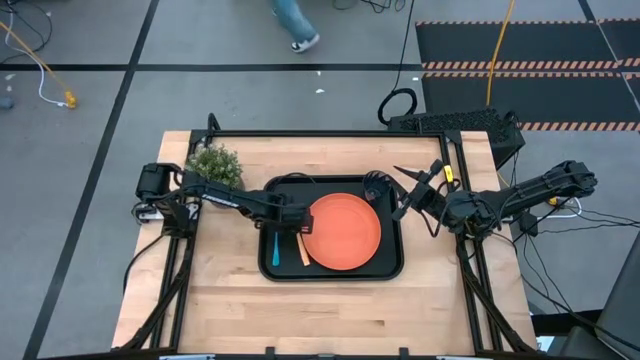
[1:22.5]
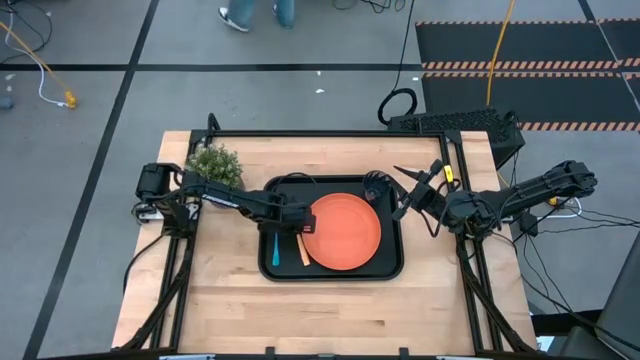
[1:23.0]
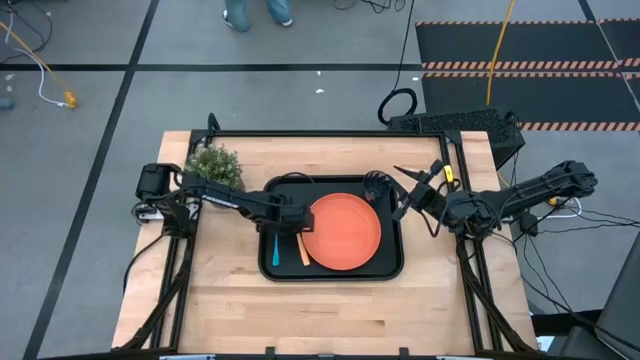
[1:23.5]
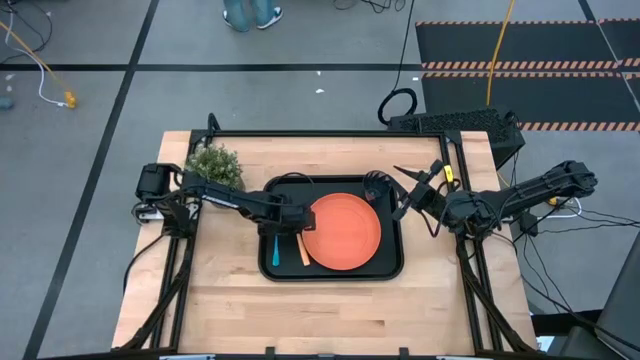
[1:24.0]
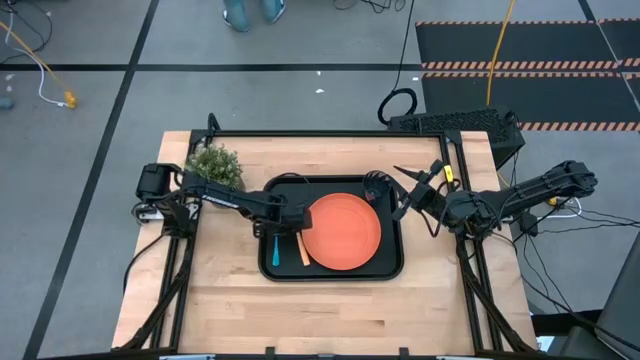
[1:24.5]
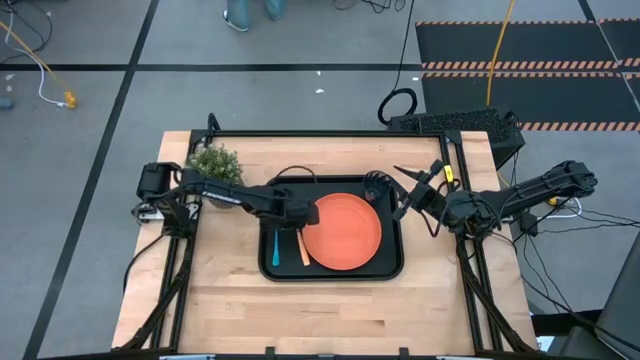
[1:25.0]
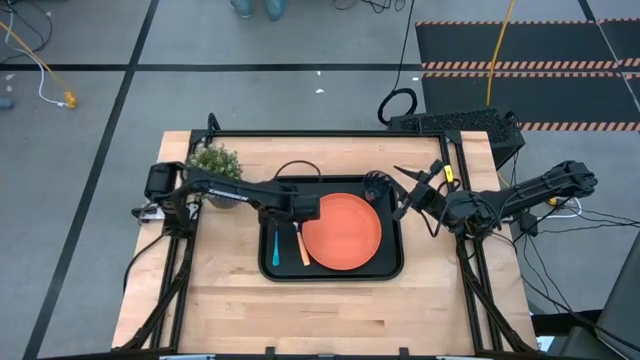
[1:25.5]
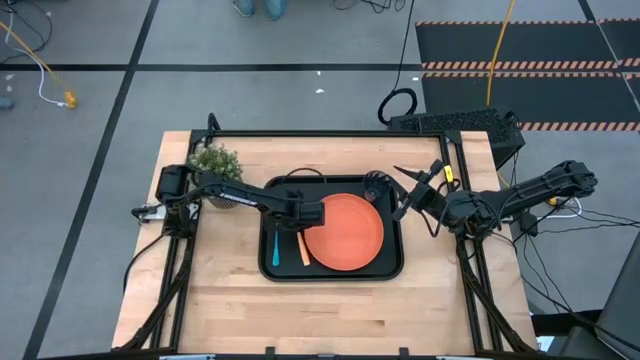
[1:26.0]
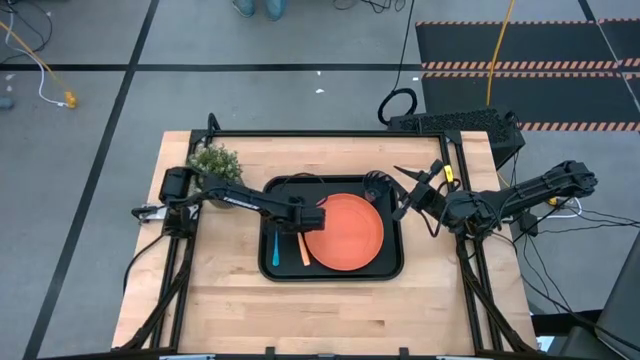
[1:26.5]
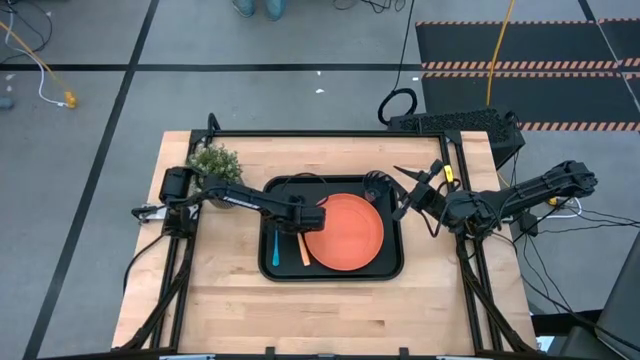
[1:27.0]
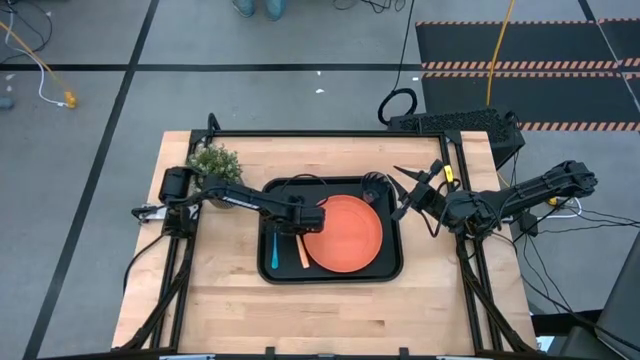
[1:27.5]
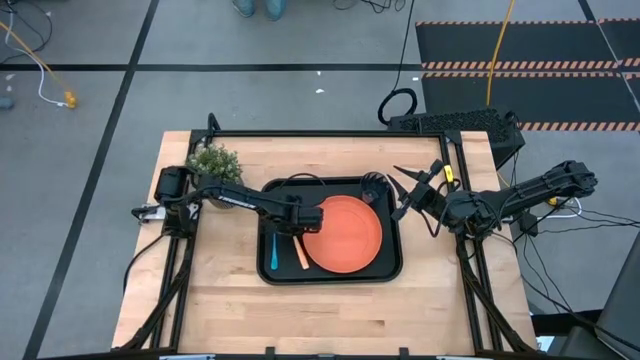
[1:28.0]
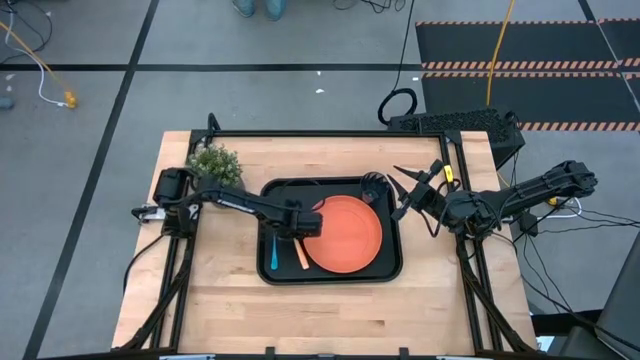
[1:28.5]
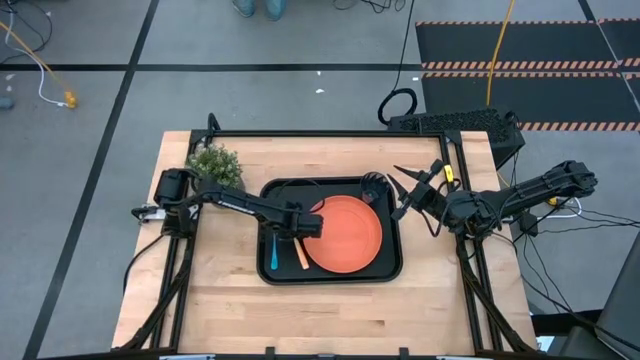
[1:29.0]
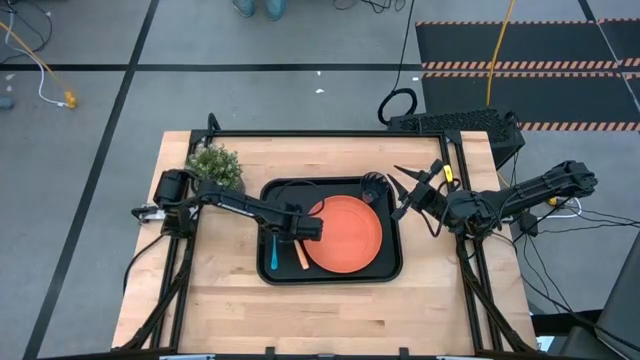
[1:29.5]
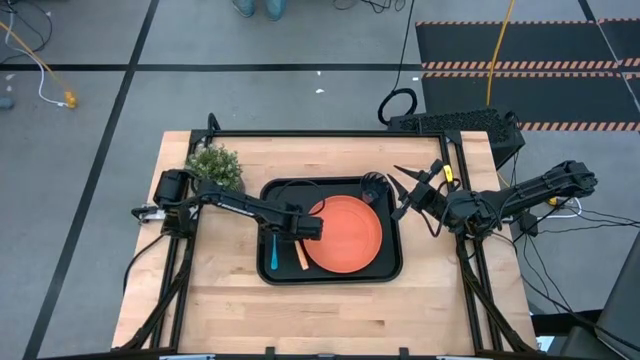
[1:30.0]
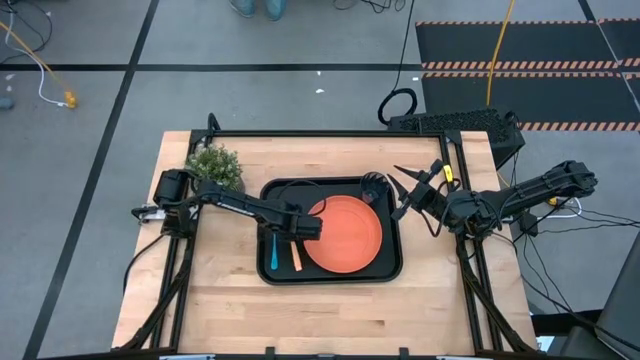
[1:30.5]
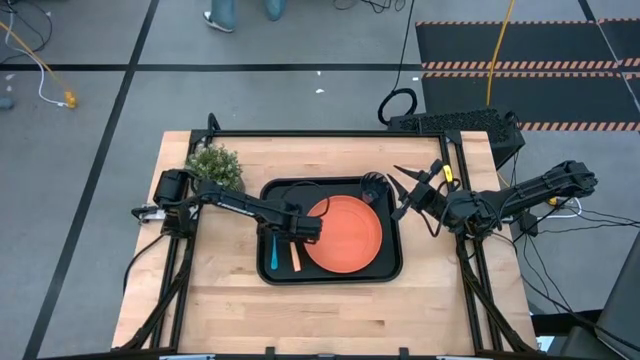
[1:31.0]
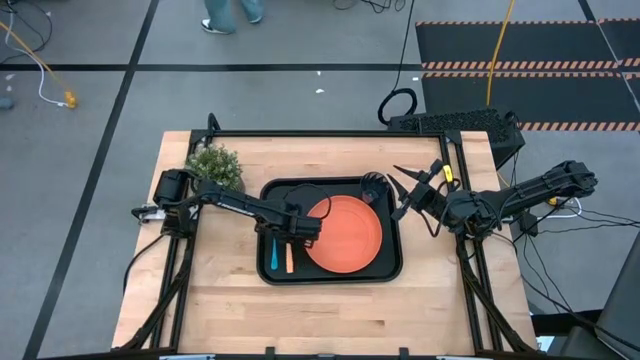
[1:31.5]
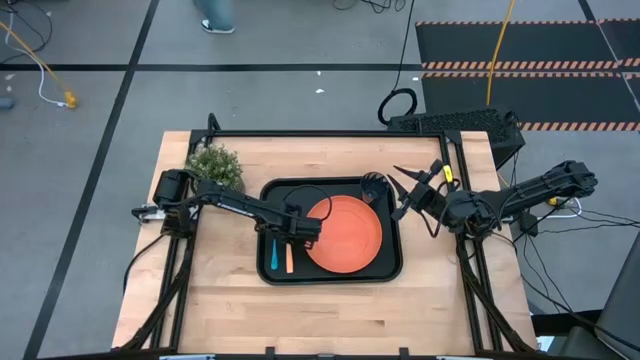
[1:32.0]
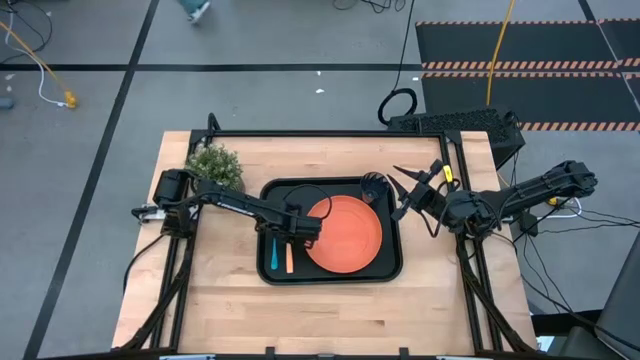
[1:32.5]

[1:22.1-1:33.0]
Task: Pick and place plate/cup/fork/spoon on tray
Adjust the light orange fork on the black serving tray

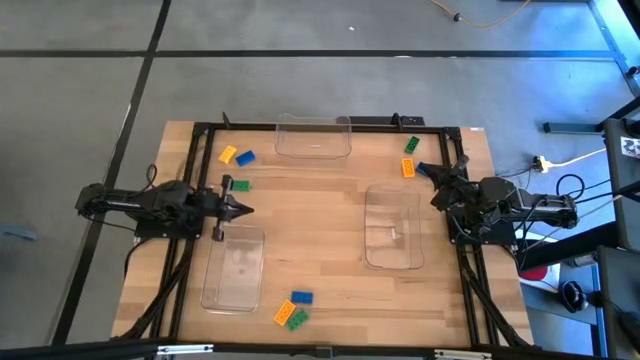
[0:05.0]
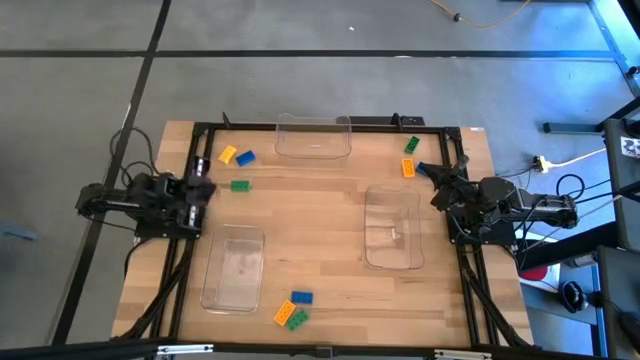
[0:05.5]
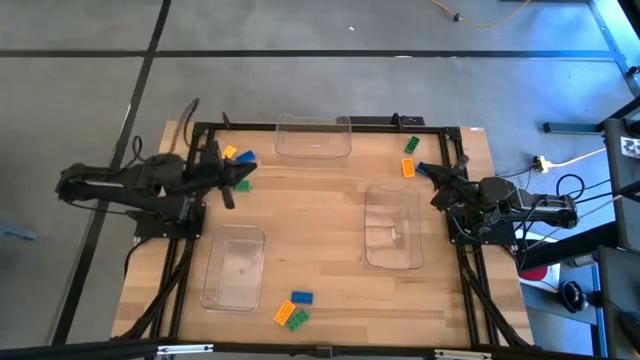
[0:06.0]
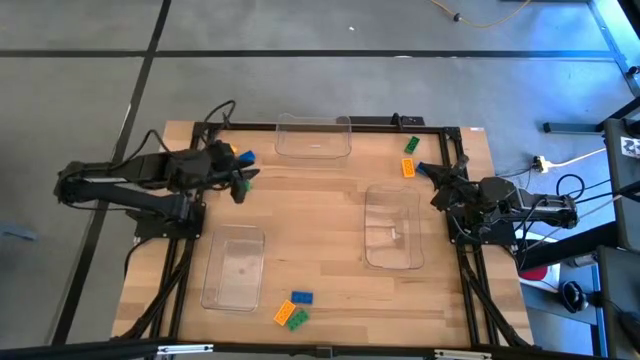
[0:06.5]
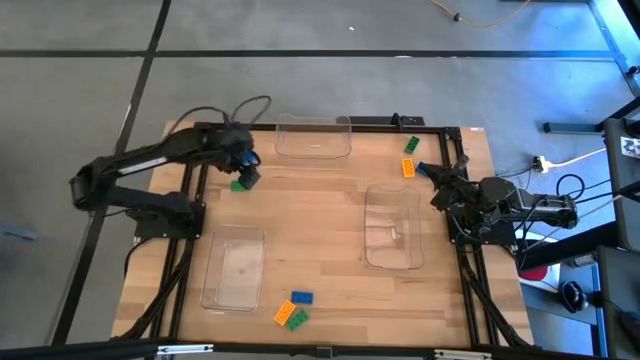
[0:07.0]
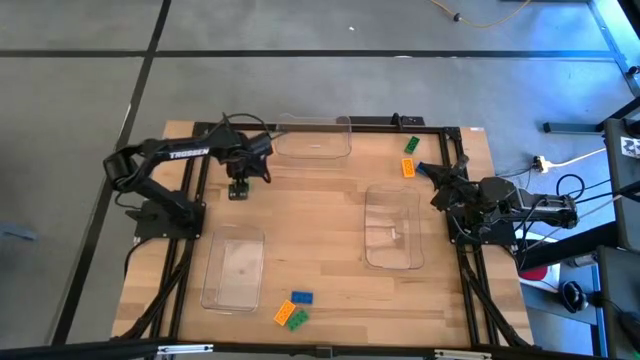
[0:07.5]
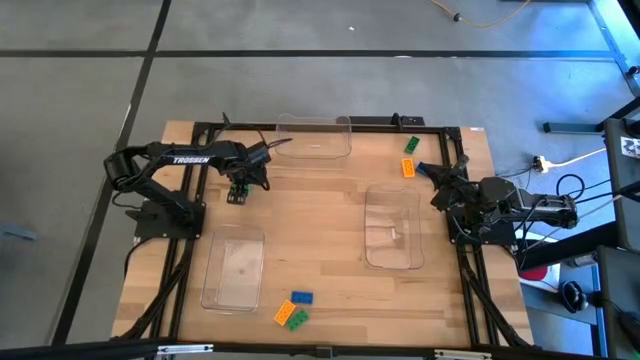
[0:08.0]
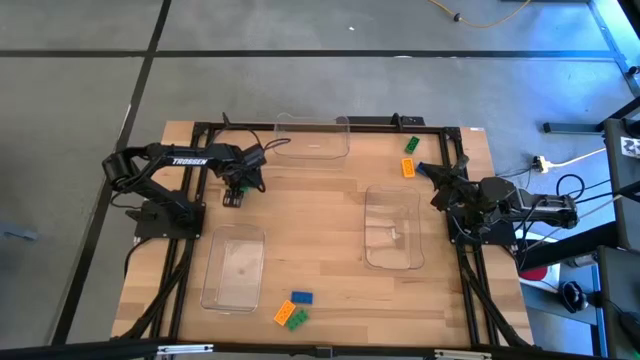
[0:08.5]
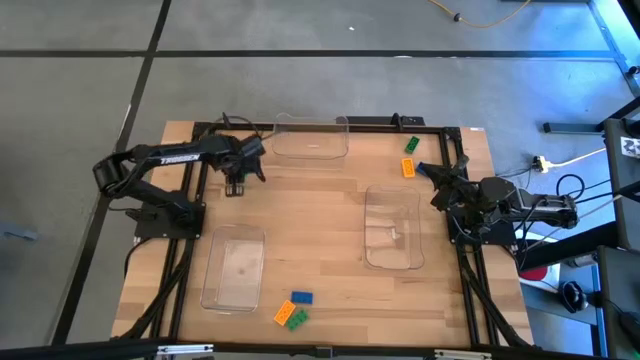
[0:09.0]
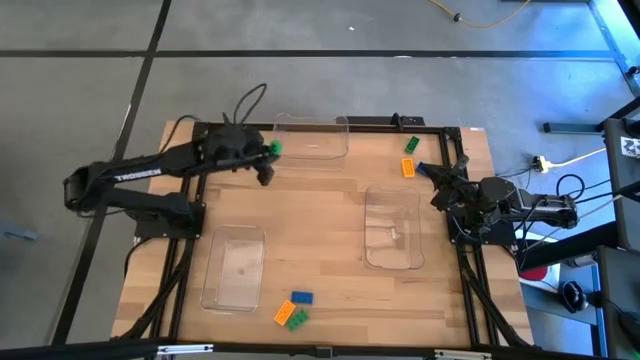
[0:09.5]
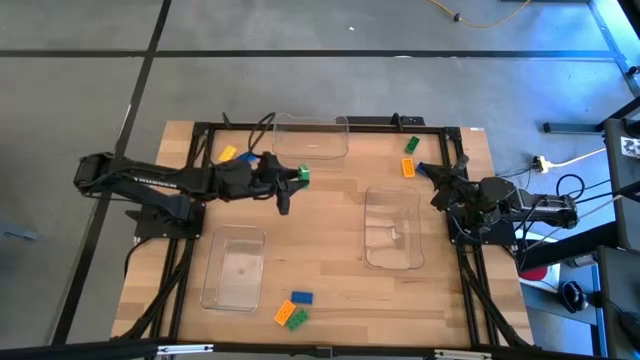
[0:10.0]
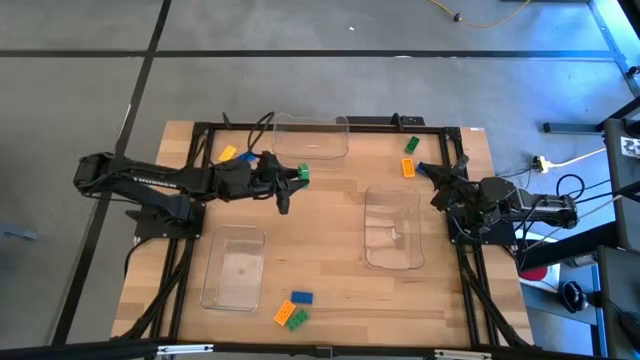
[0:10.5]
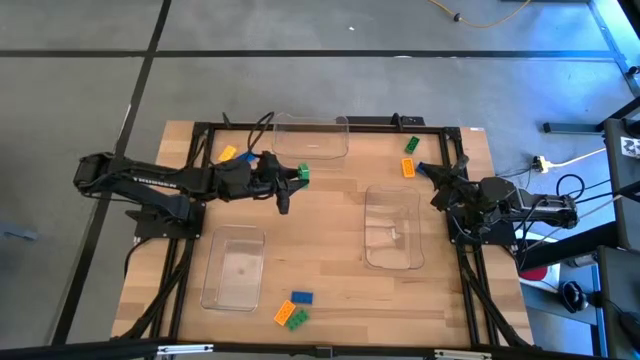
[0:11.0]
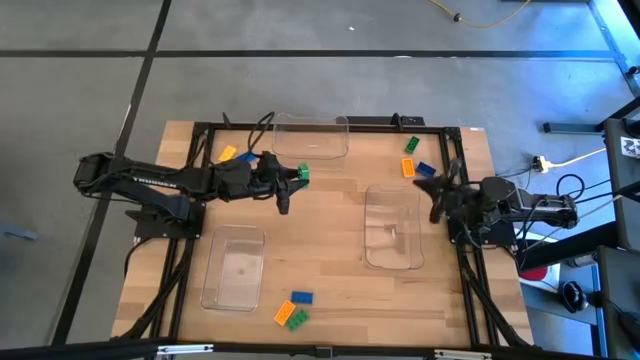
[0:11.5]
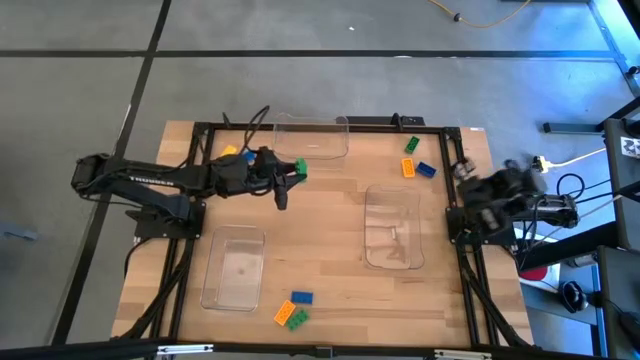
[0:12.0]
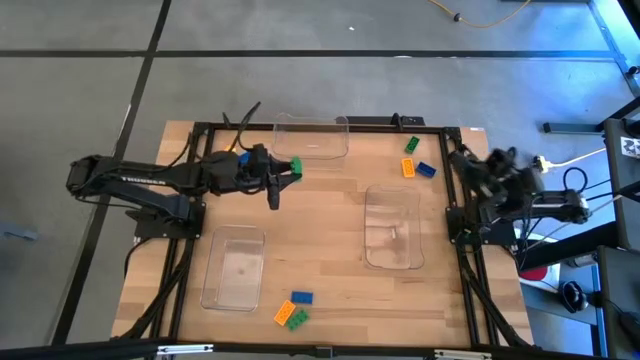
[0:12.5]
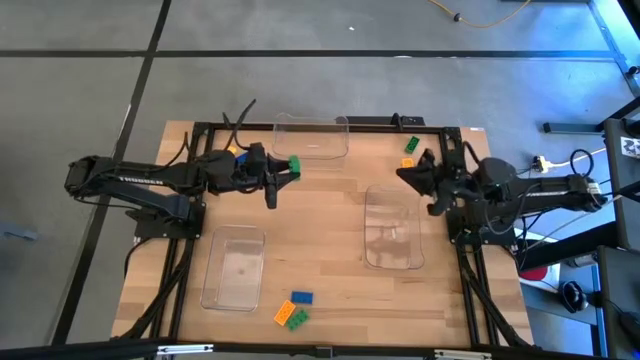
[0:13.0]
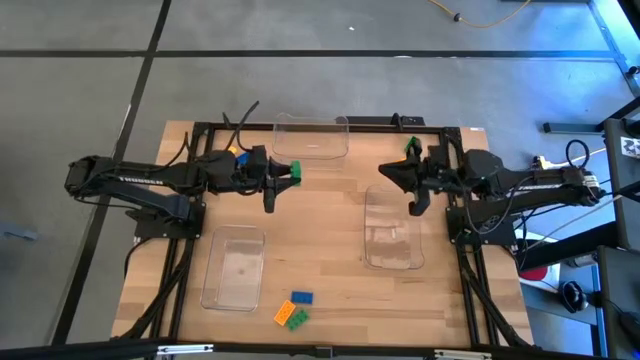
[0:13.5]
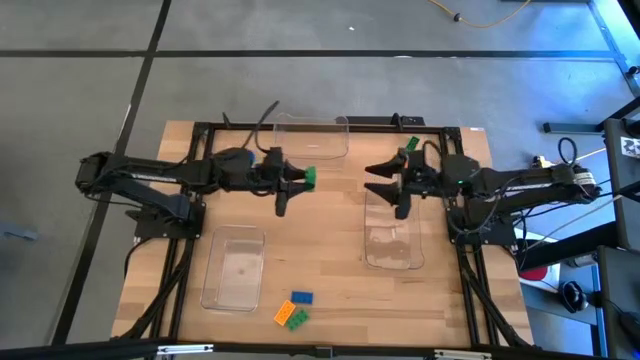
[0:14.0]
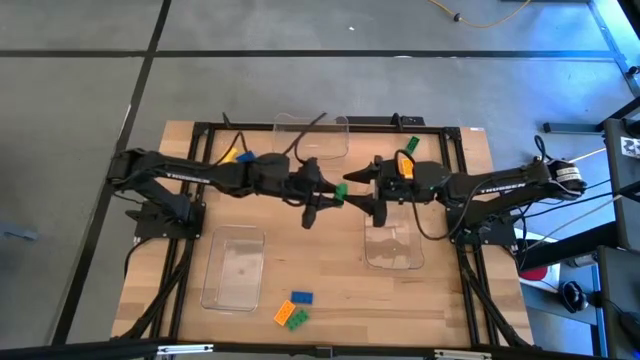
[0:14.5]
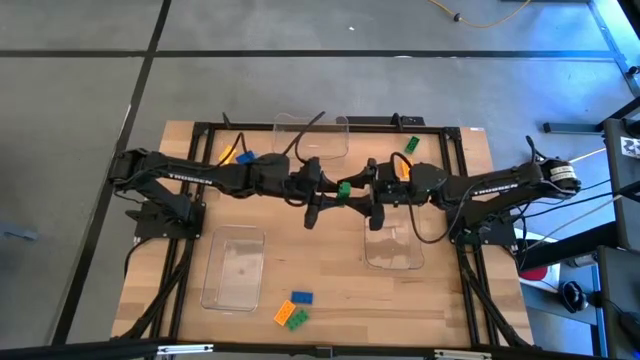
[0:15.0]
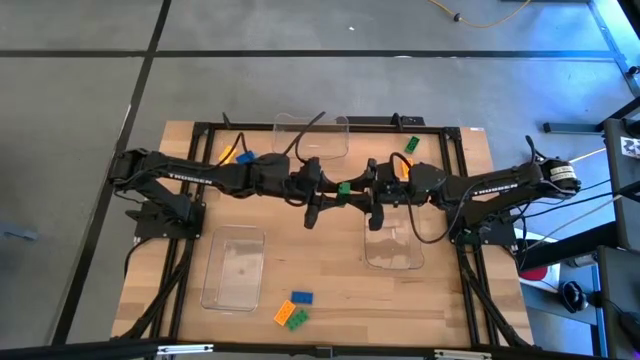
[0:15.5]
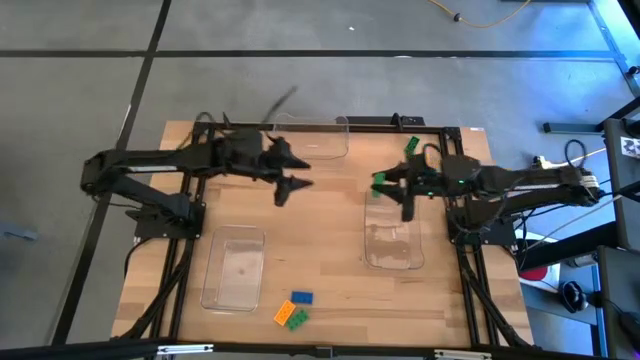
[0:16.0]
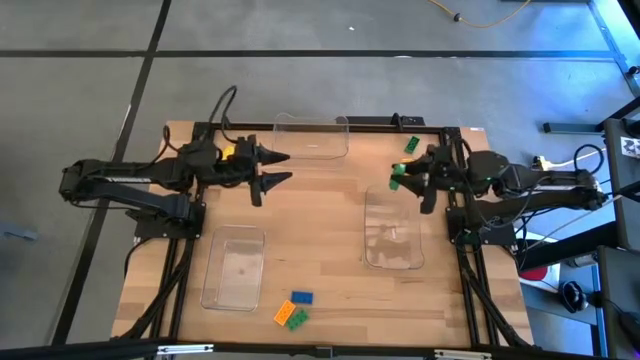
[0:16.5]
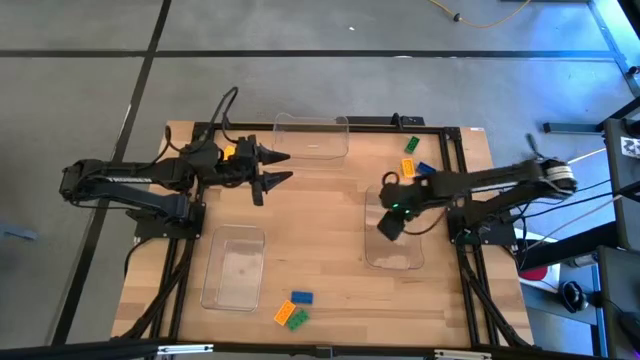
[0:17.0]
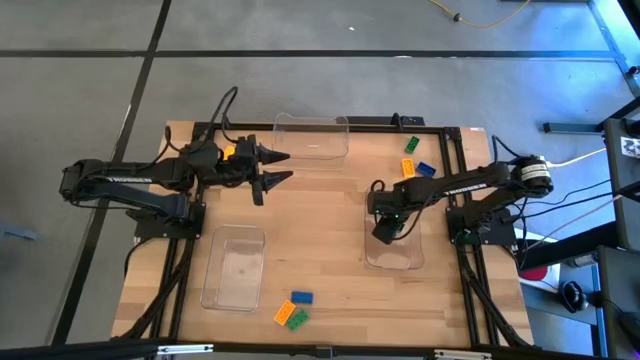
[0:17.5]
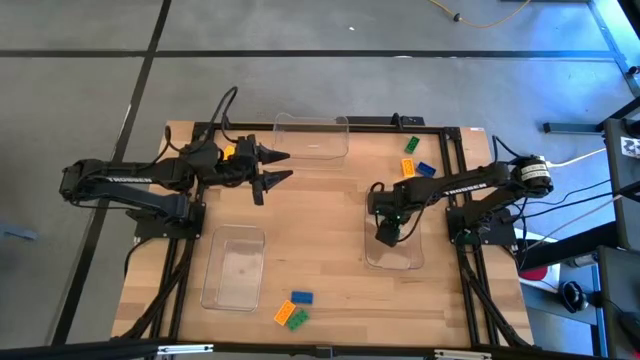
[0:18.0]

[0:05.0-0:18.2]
Task: Sort & place blocks by color
Put the top left green block into the bottom right transparent bin
